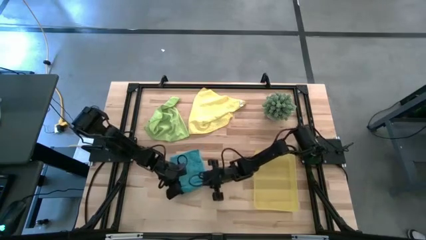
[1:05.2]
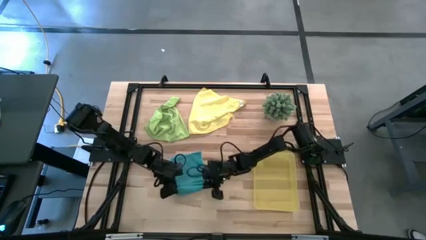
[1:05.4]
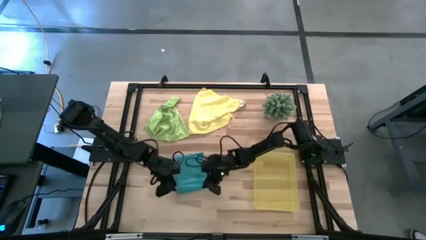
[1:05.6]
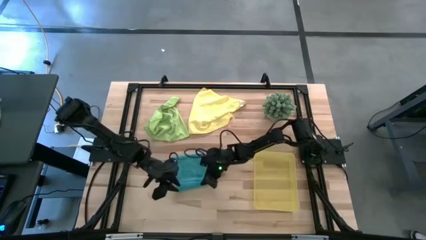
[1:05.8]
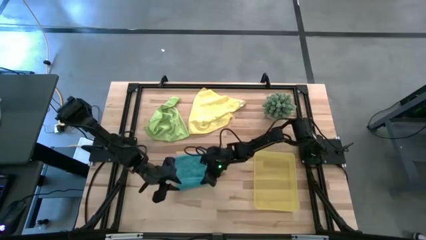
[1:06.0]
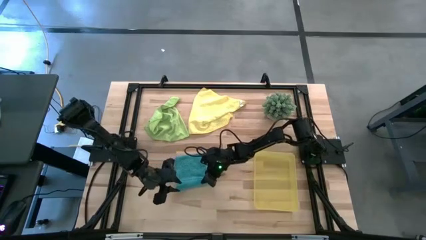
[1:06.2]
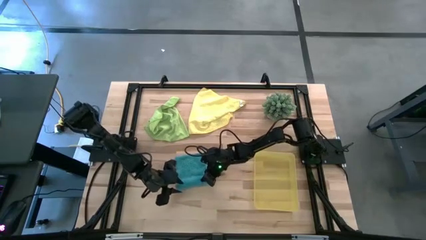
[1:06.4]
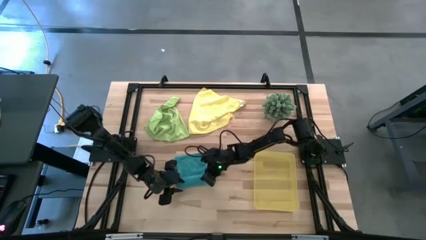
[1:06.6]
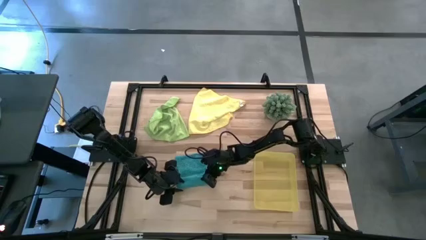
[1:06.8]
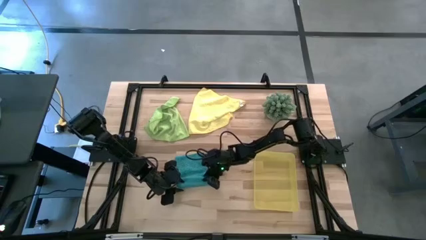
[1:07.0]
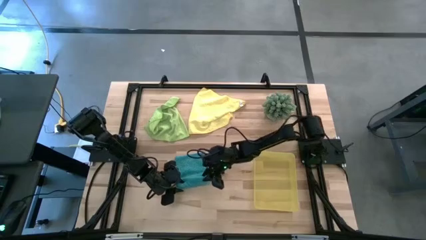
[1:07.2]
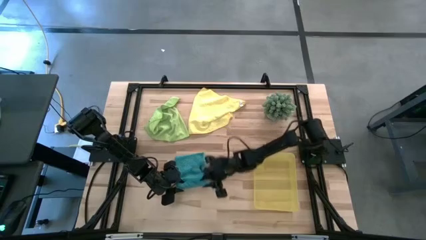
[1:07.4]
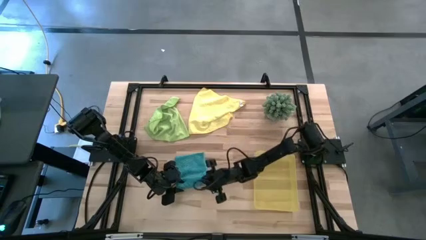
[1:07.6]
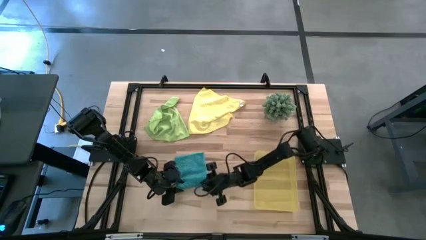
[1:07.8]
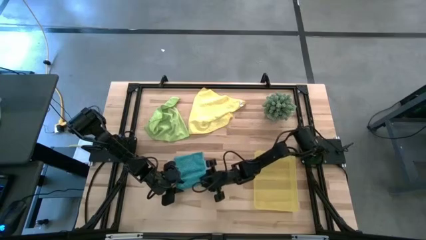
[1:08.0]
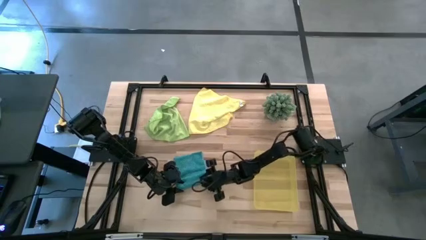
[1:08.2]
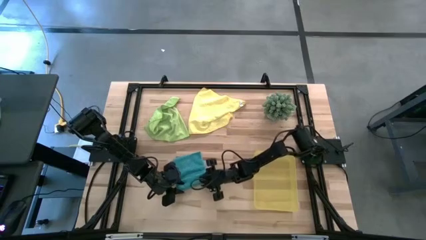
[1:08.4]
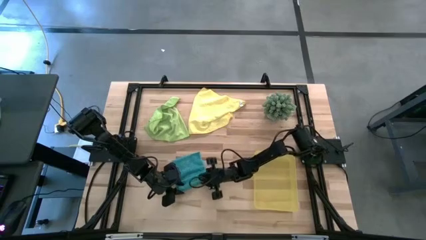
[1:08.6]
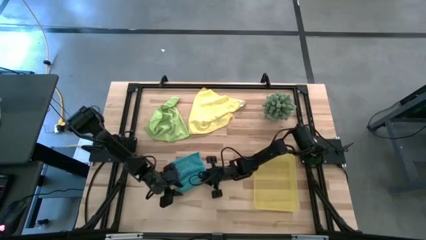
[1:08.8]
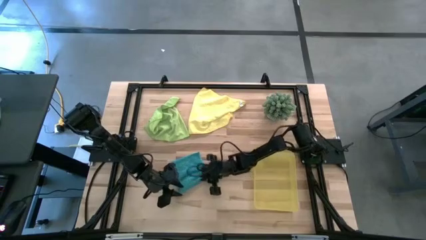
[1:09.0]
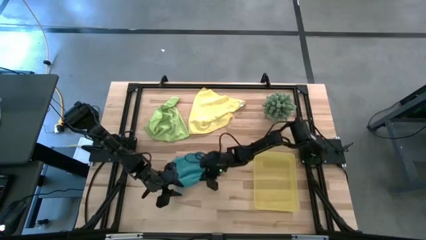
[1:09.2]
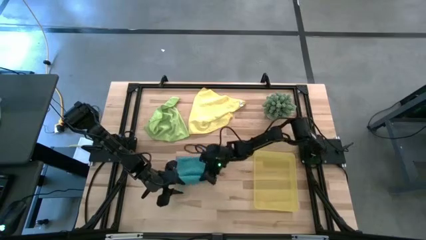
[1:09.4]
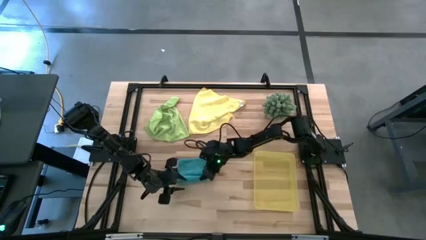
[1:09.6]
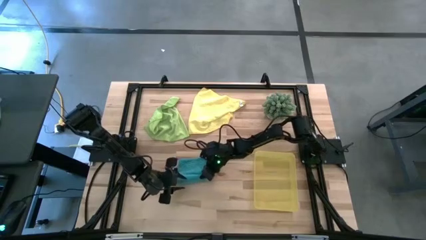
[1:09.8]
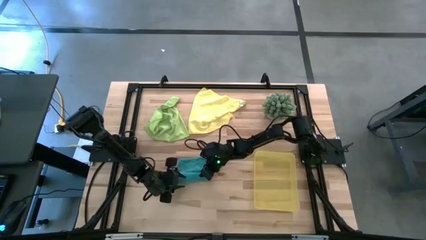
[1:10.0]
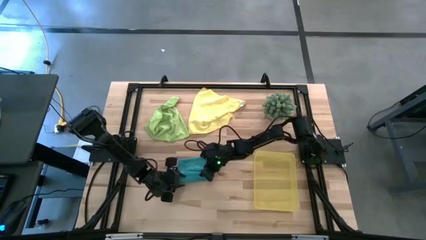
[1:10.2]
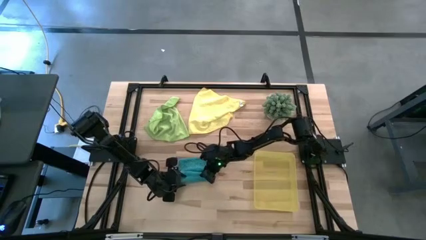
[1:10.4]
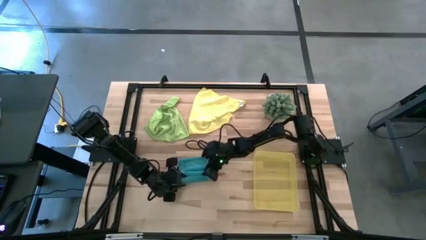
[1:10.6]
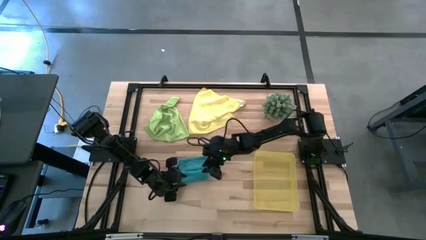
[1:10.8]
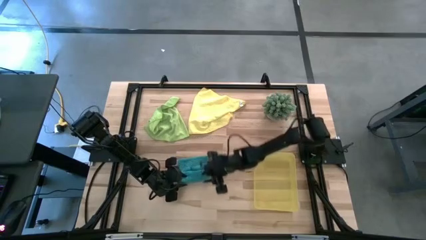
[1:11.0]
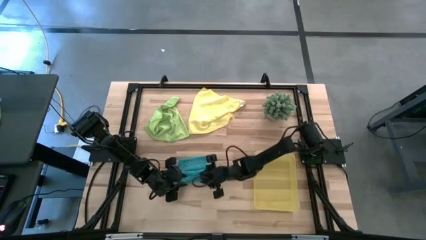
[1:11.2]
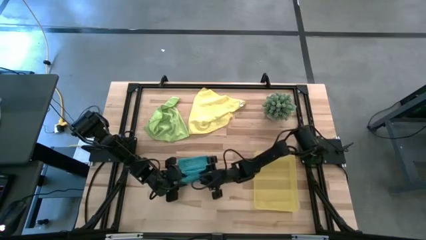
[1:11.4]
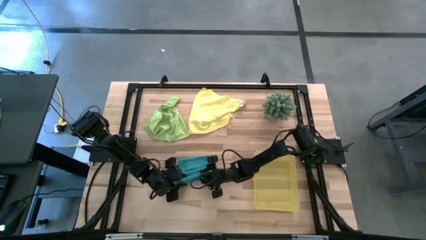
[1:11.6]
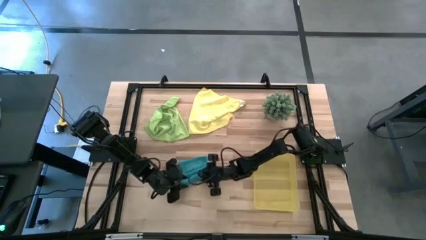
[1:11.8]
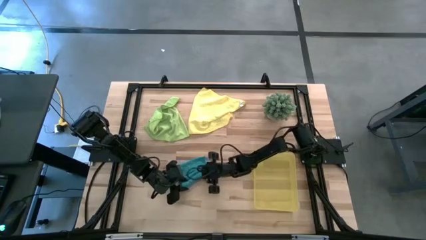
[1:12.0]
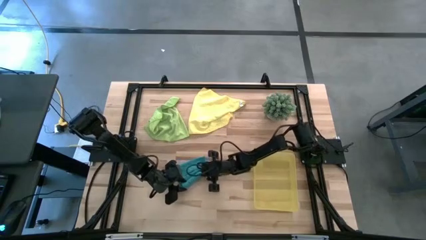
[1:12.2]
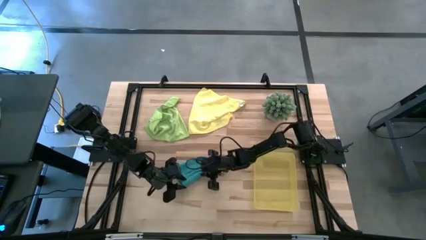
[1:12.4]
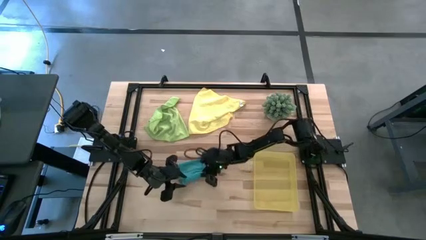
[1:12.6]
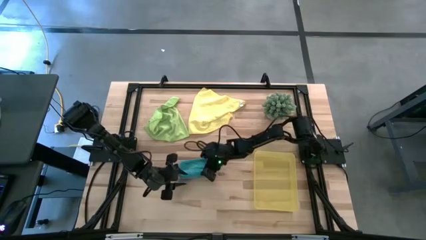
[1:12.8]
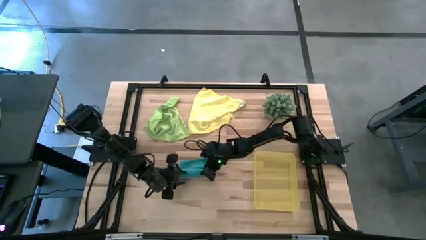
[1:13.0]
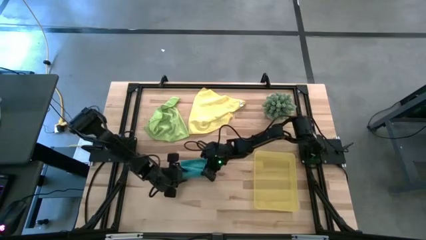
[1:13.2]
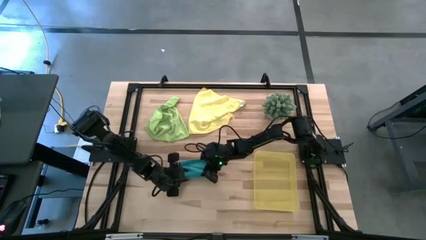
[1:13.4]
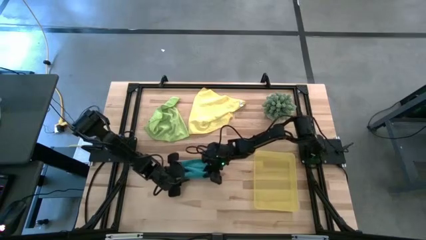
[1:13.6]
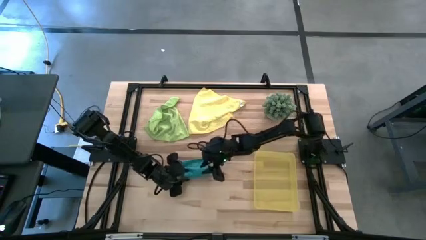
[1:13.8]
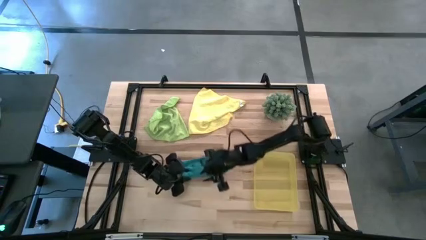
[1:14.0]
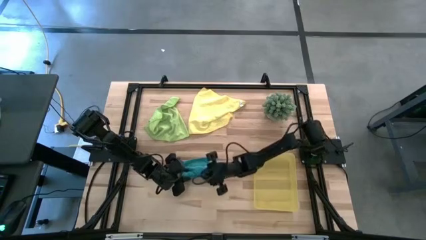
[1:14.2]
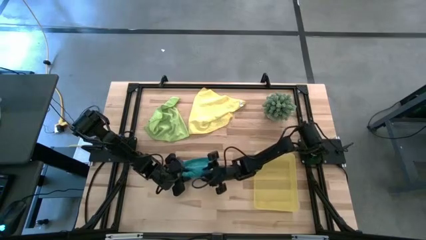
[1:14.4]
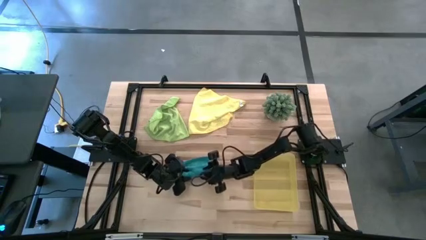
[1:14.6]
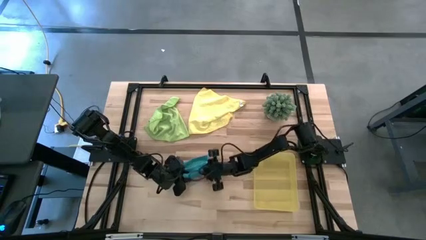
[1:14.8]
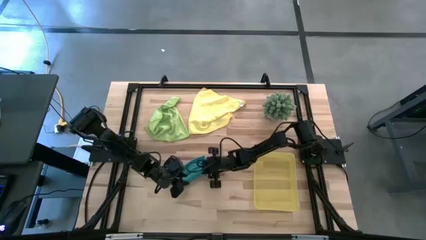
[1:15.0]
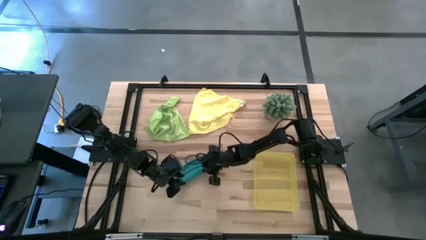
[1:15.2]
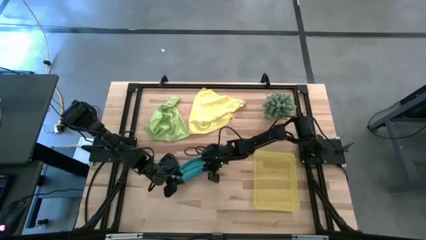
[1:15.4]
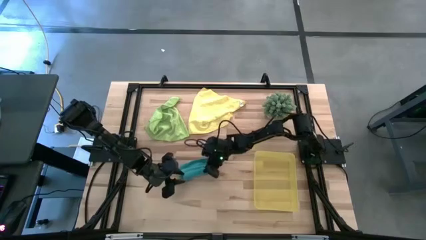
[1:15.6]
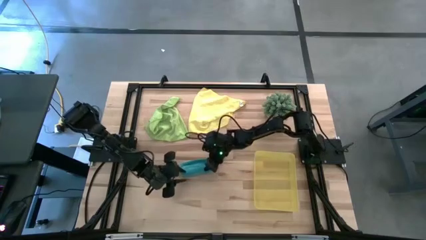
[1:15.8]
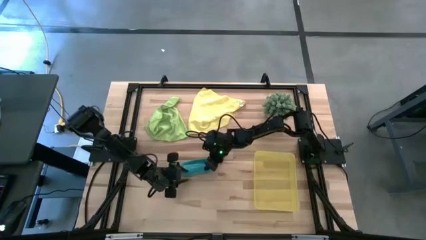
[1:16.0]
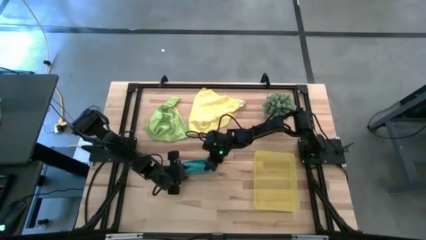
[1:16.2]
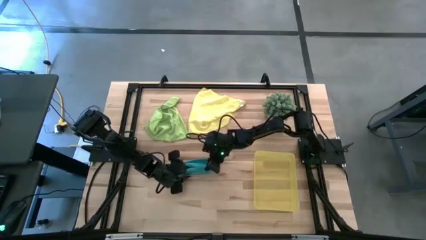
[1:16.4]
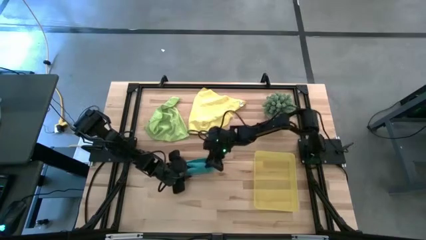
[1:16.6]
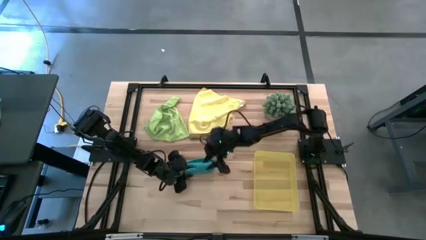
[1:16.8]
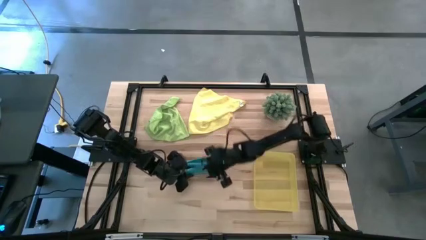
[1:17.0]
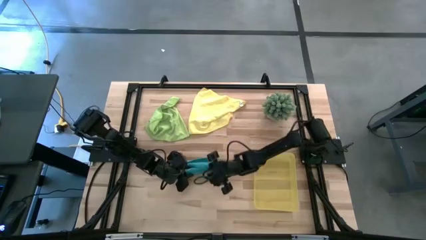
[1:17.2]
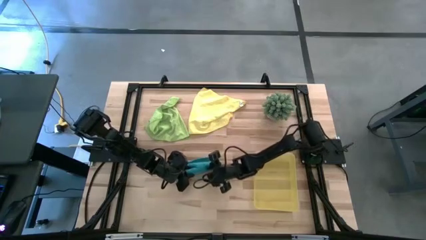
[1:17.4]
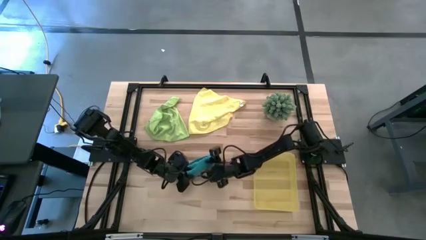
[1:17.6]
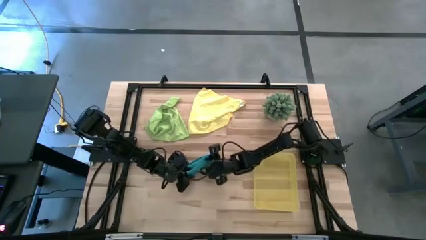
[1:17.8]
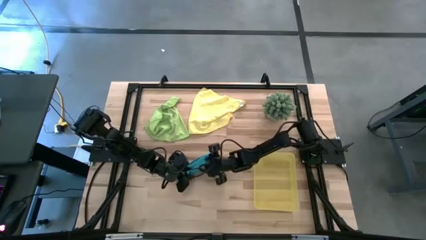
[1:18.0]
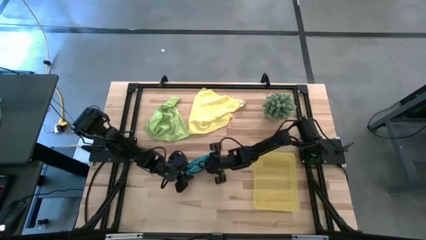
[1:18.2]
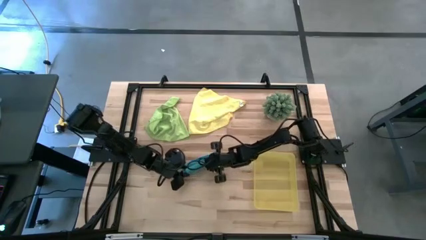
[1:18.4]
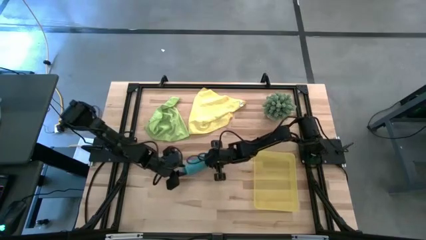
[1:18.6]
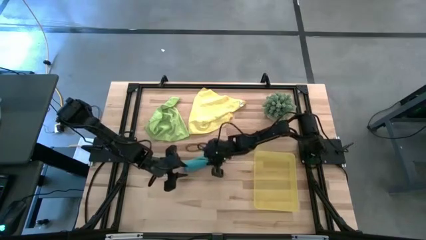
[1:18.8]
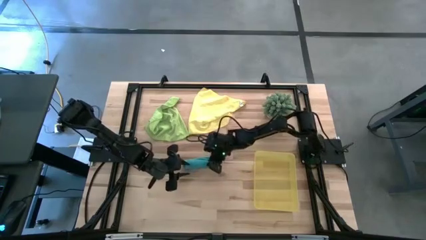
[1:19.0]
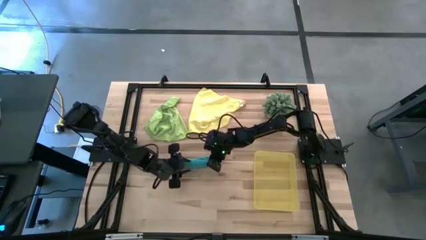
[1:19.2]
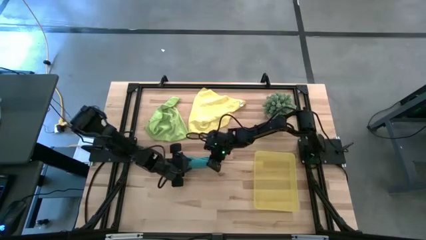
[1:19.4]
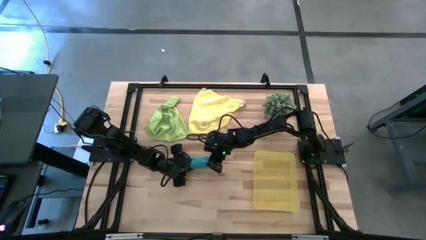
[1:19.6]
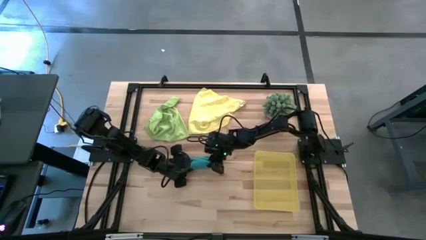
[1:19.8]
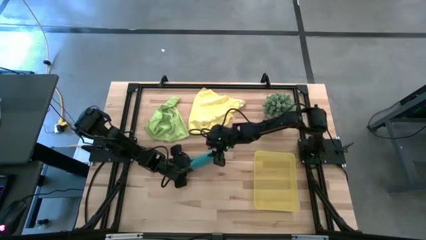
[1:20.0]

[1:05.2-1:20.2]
Task: Roll microfiber towels into tight, uniform cylinder then place into a basket
Roll the blue microfiber cloth
